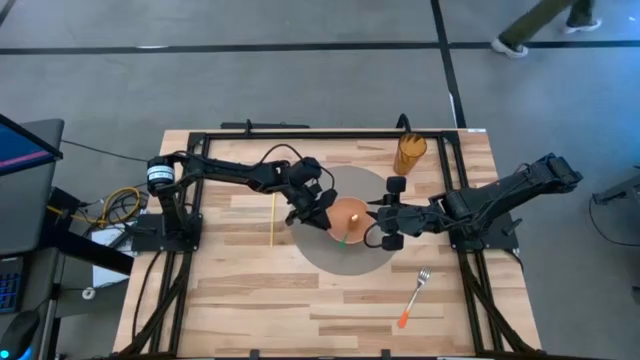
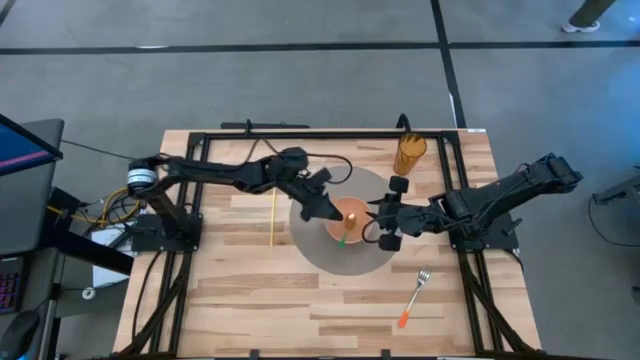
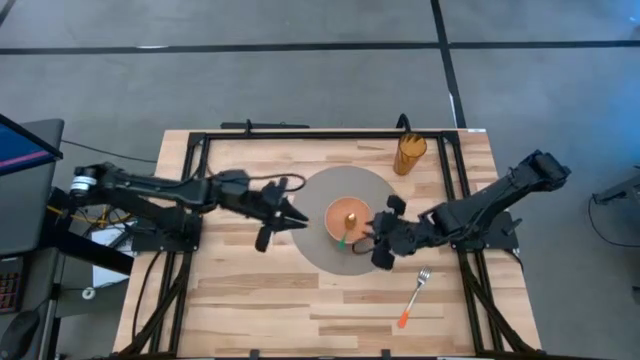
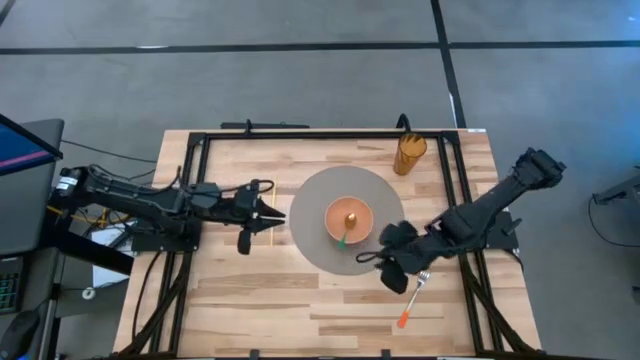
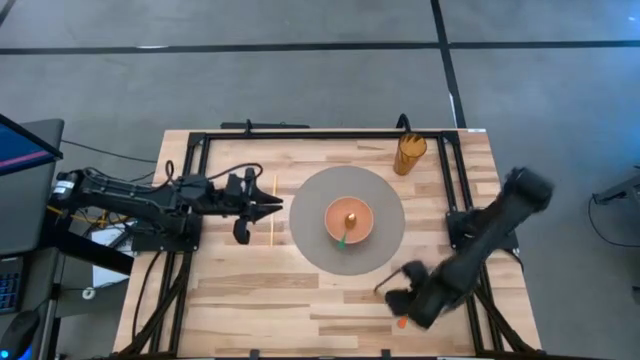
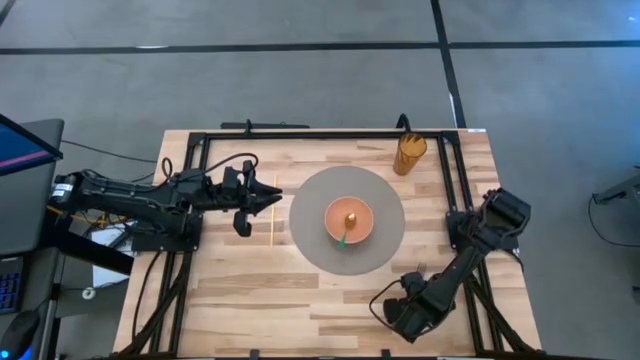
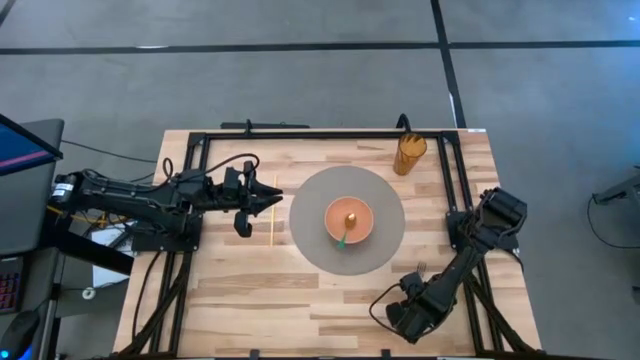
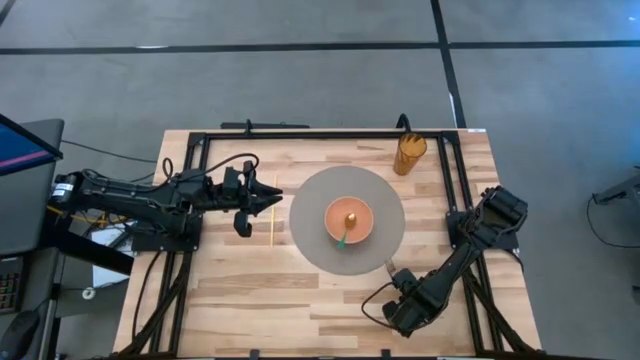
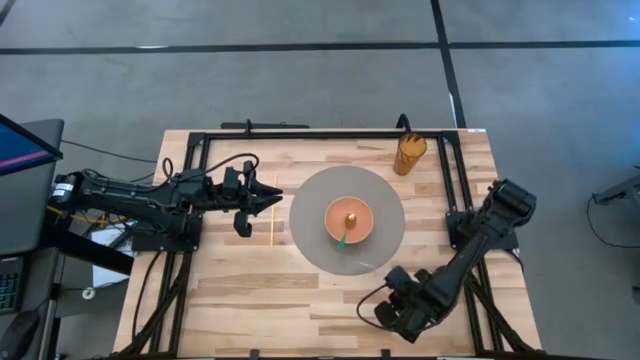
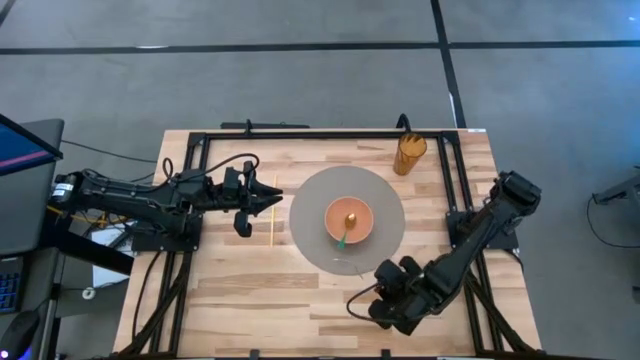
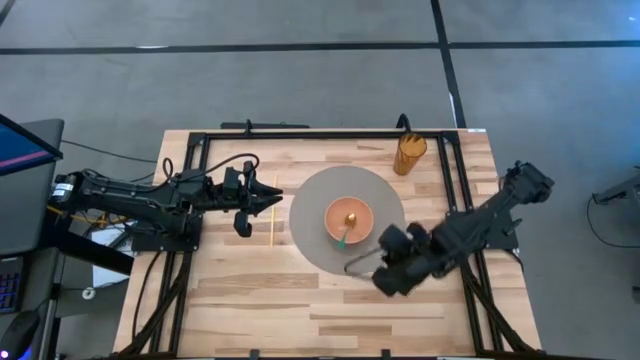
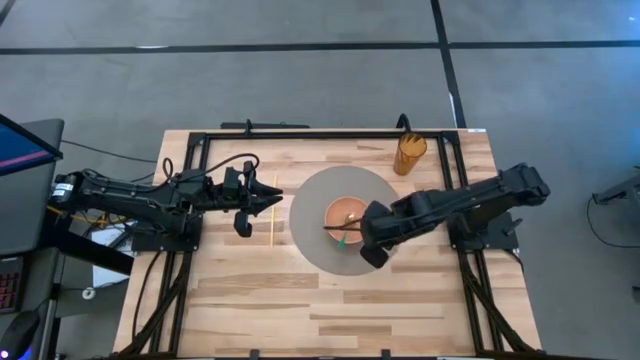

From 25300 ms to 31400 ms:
Task: Pick & Place Utensil
Put the orange fork into the orange bowl on the gray mat

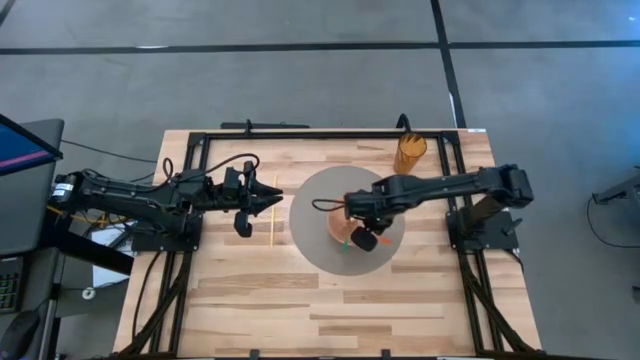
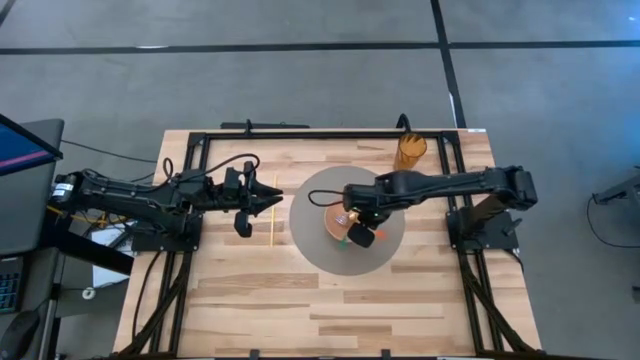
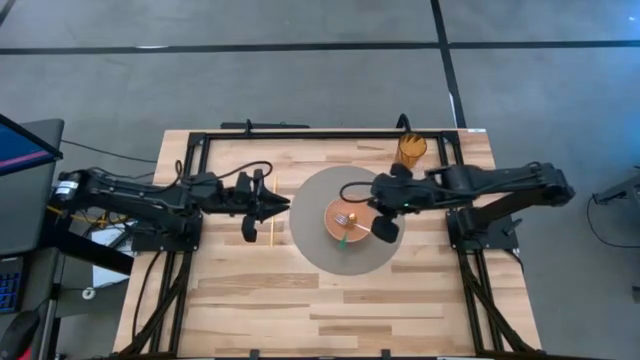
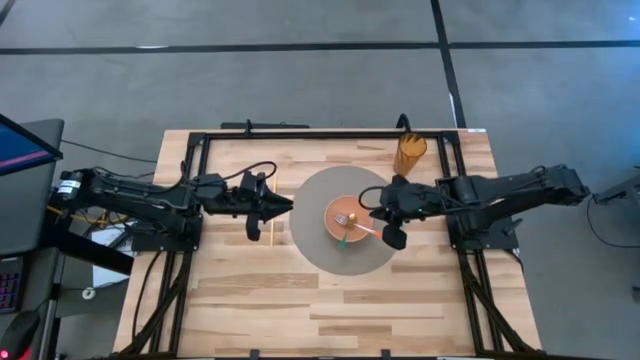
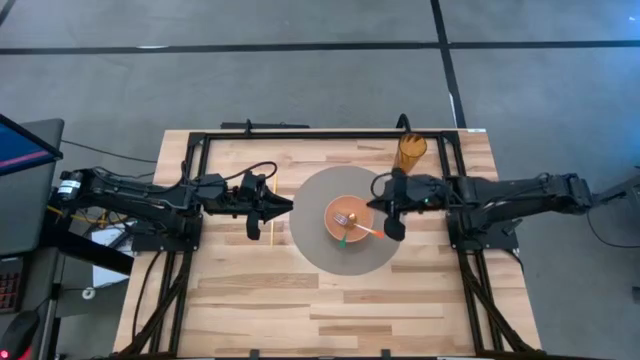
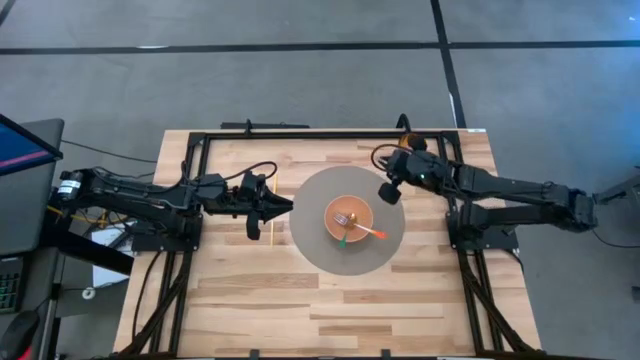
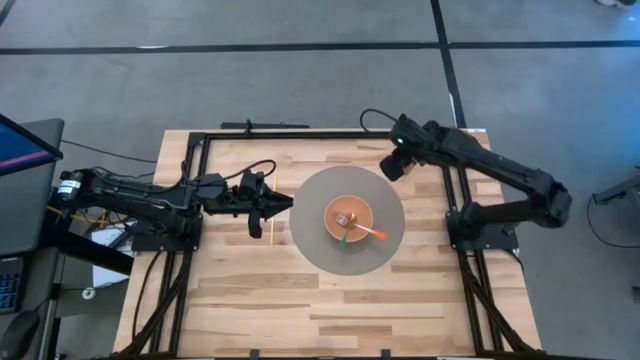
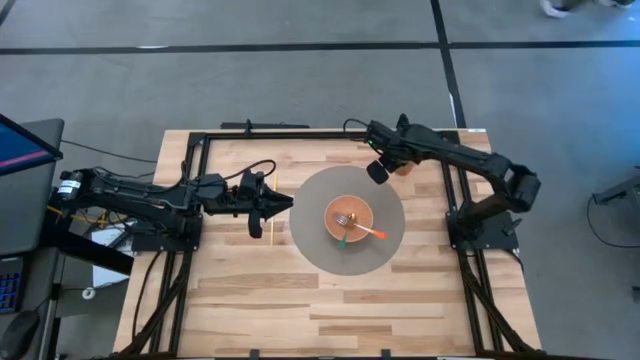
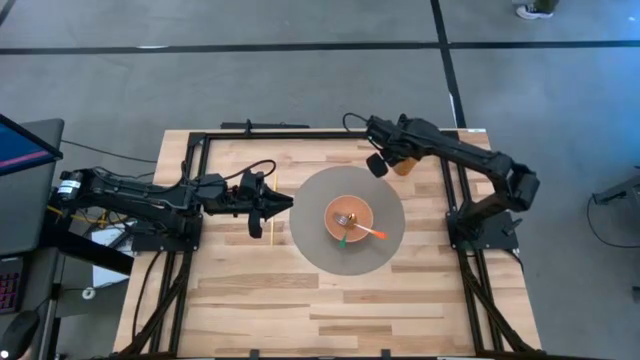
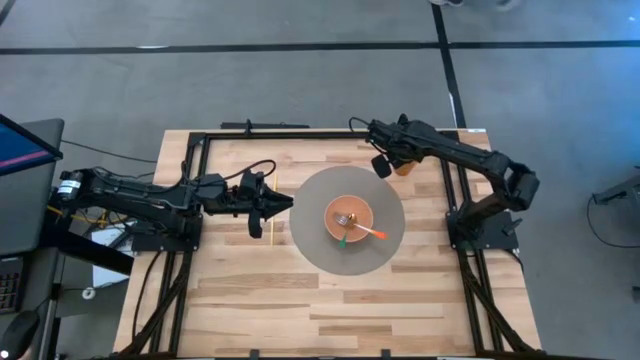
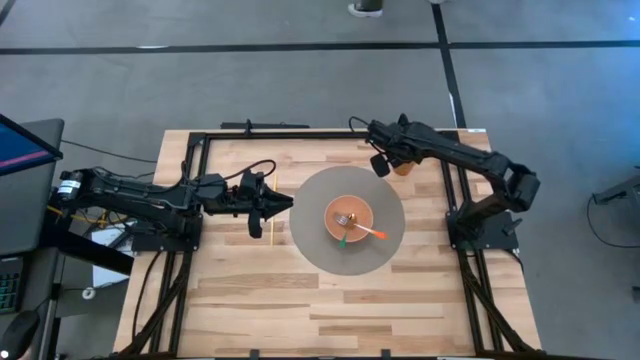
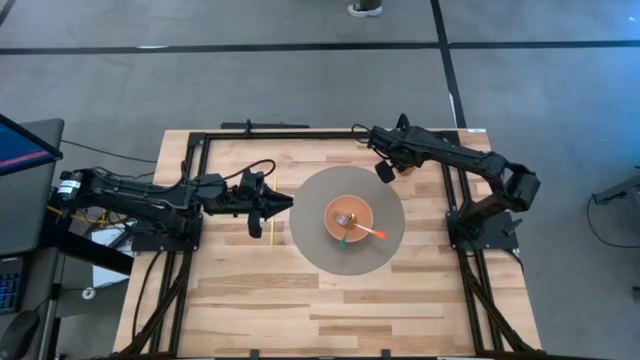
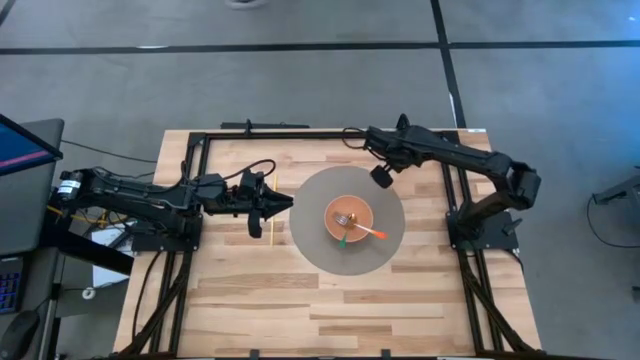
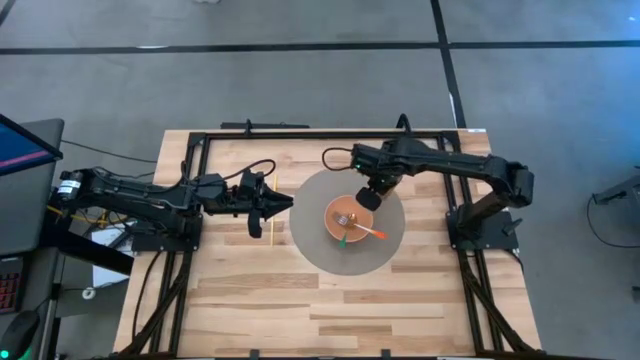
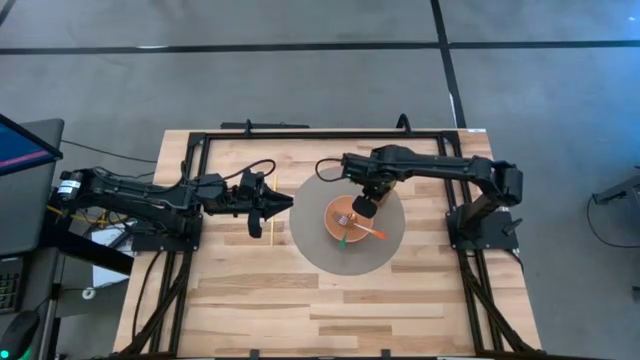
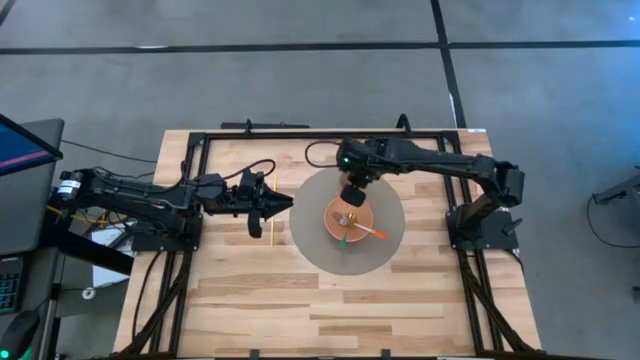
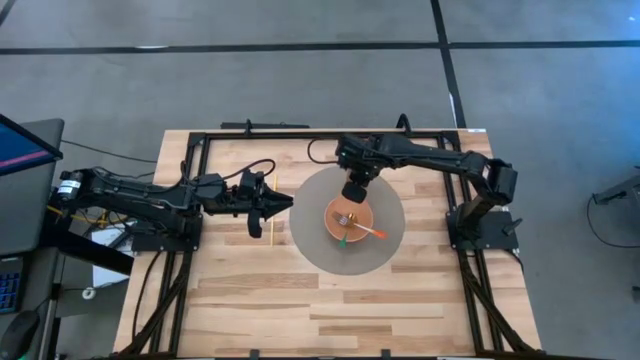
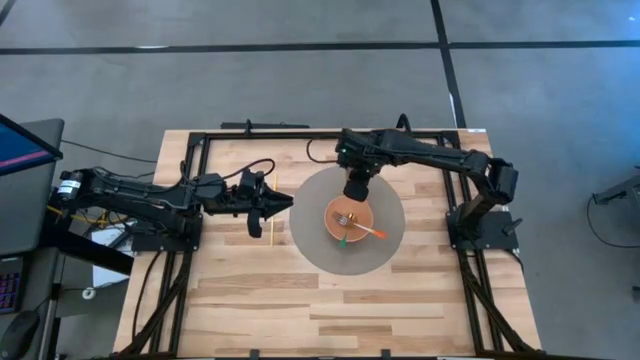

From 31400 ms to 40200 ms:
Put the brown cup on top of the orange bowl on the gray mat

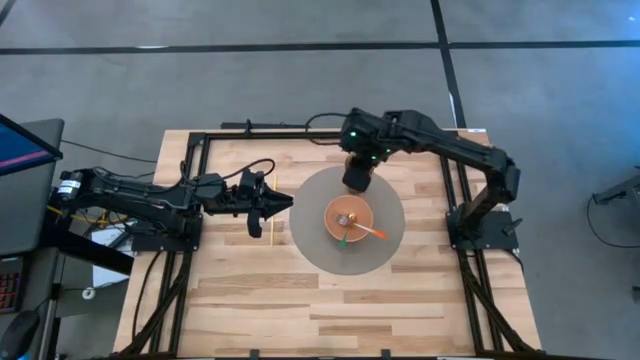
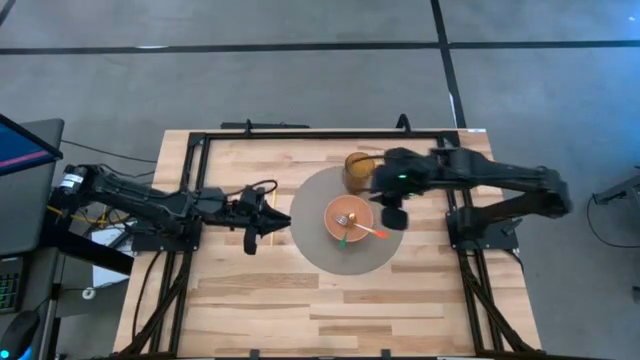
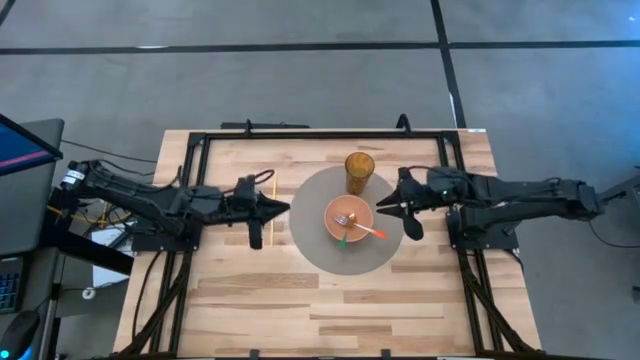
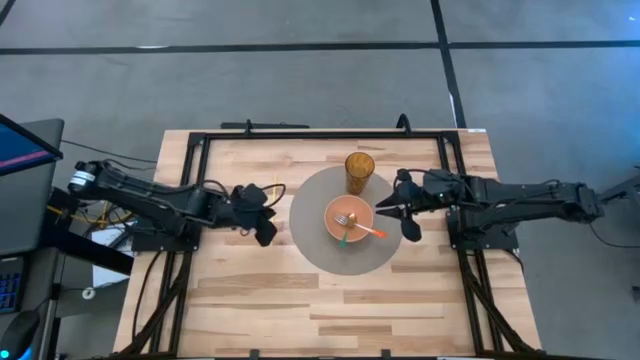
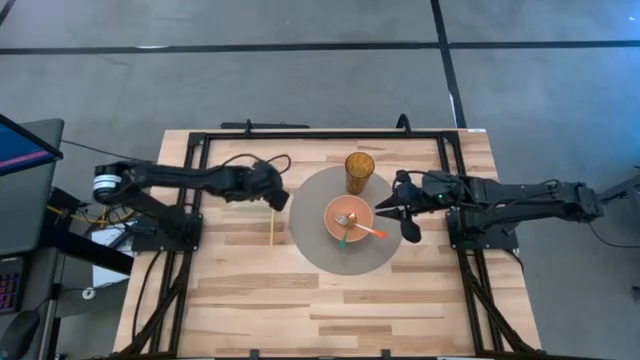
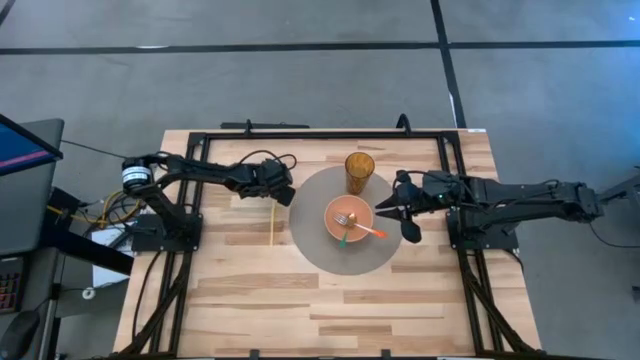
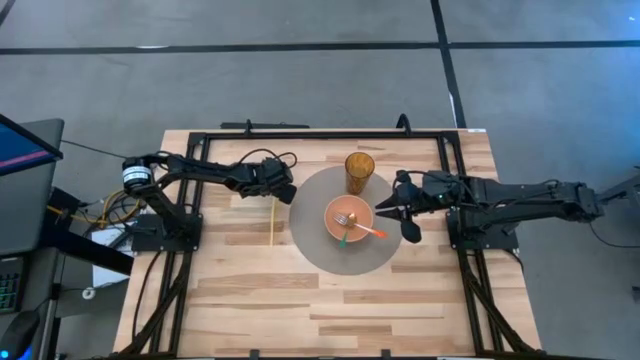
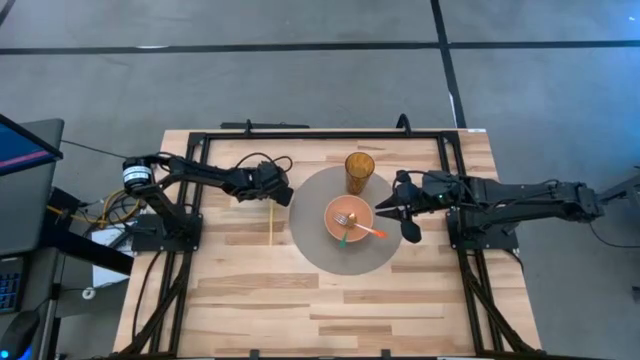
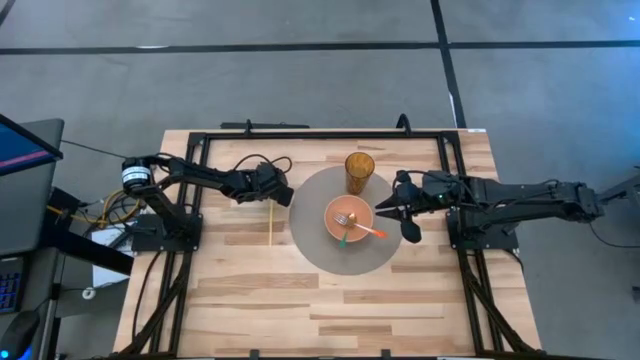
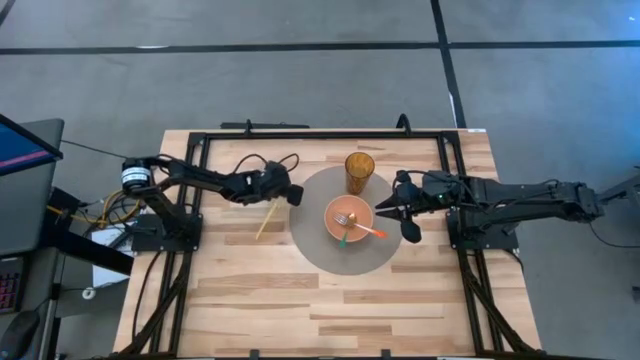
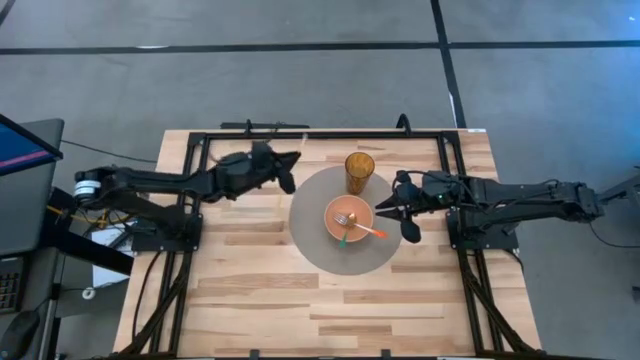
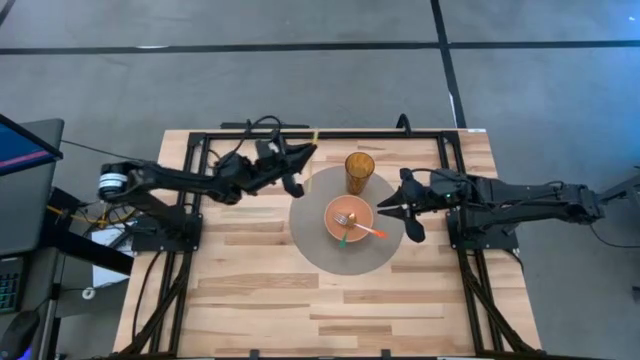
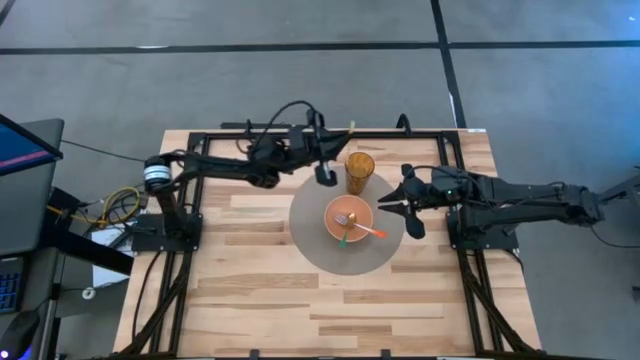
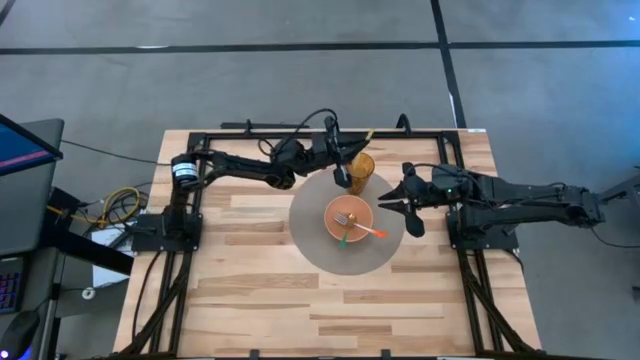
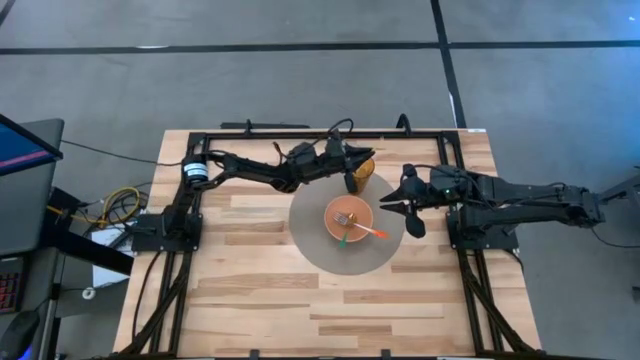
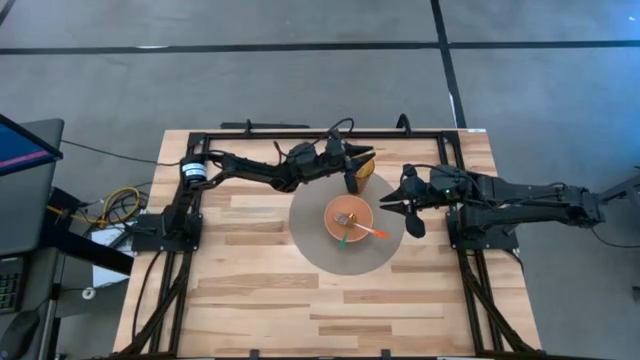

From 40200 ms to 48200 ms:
Put the yellow straw into the brown cup on the gray mat
